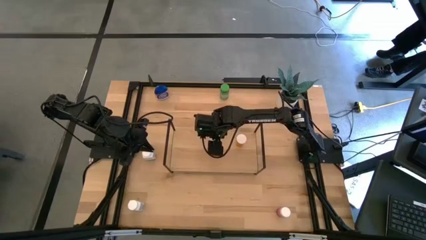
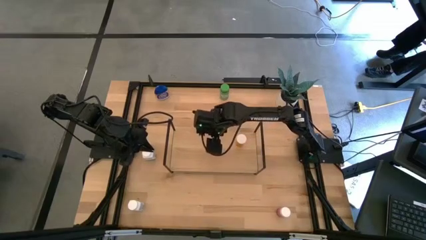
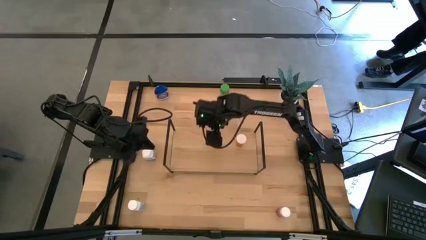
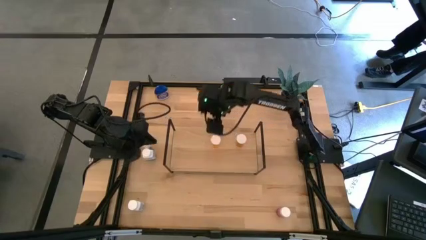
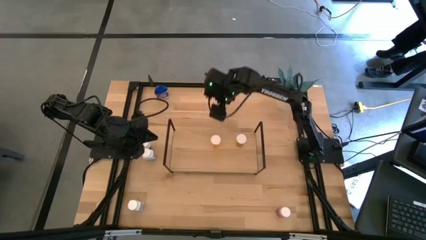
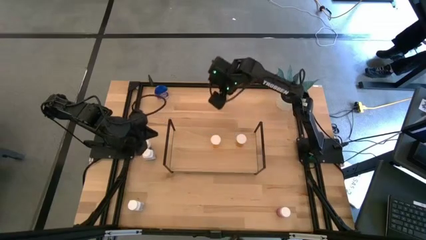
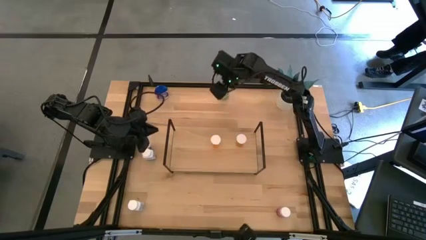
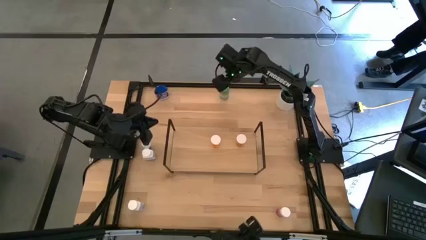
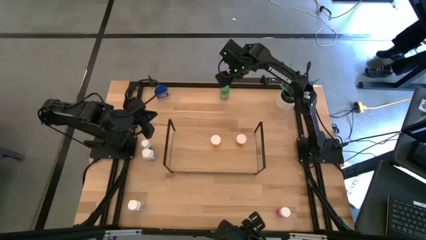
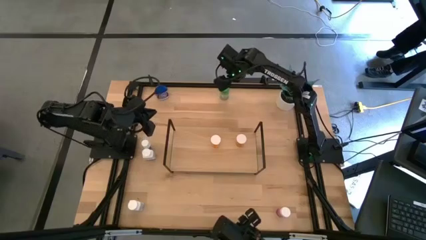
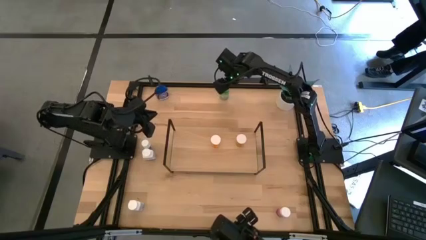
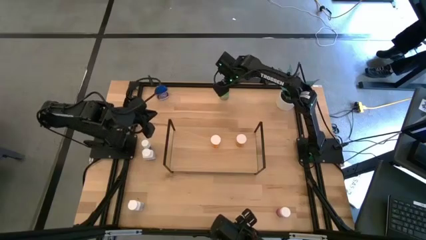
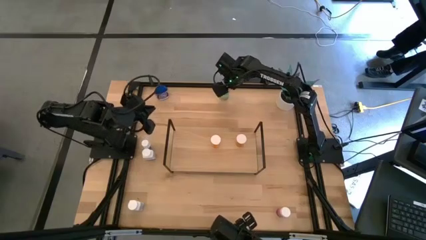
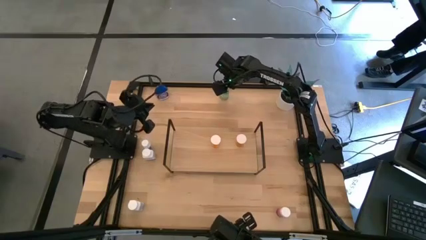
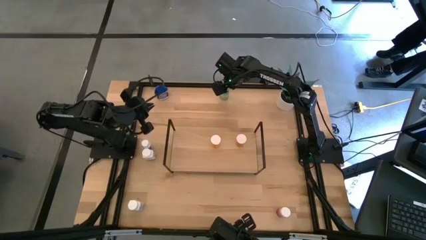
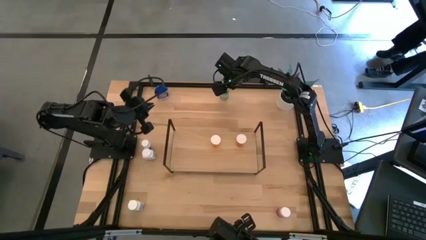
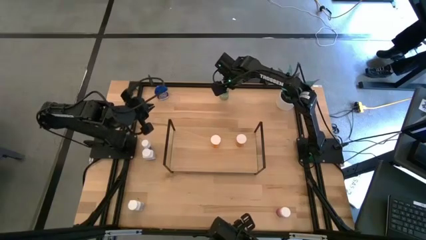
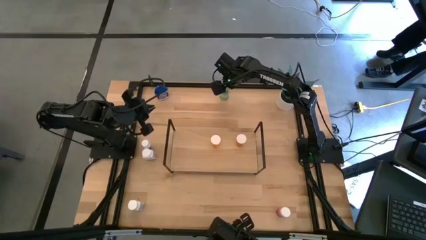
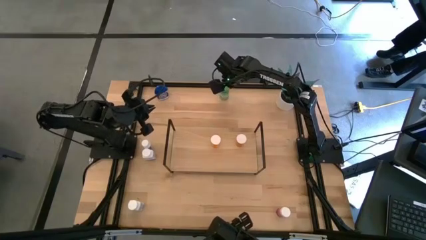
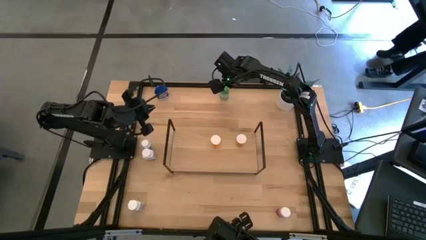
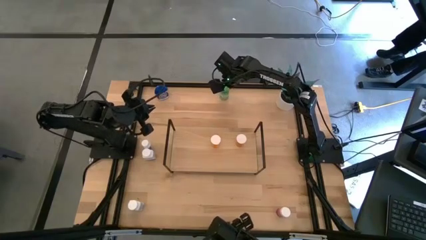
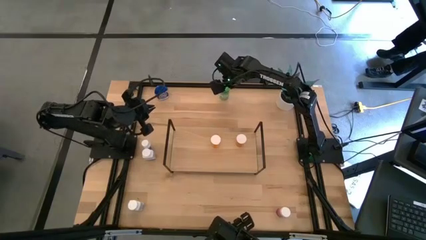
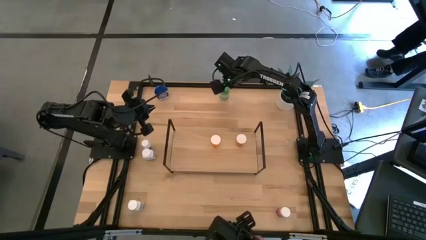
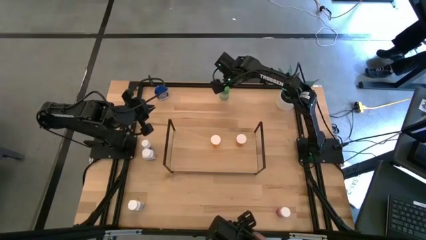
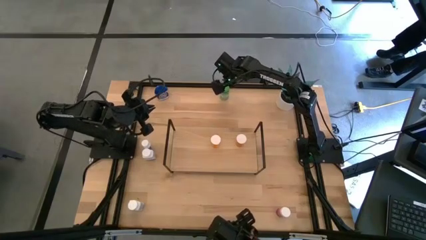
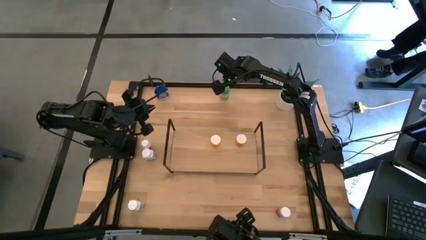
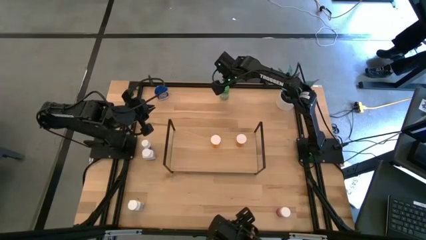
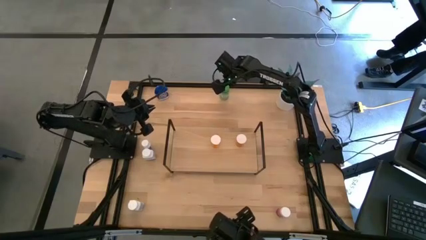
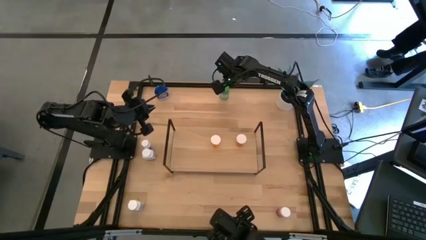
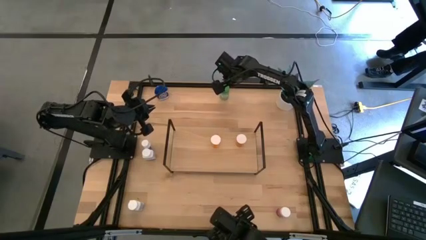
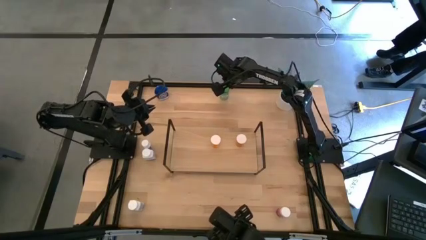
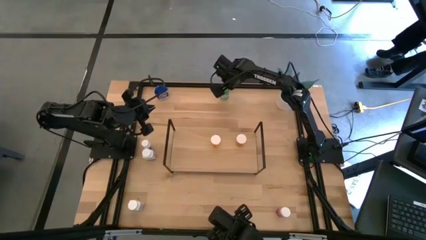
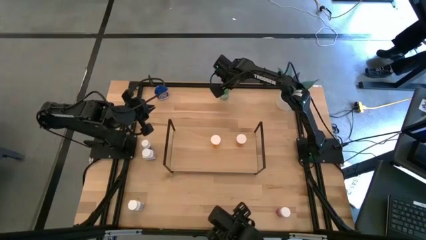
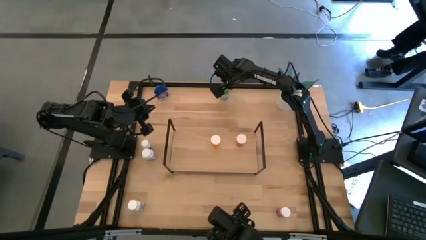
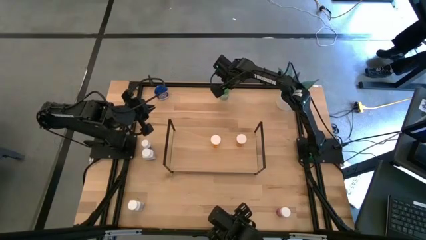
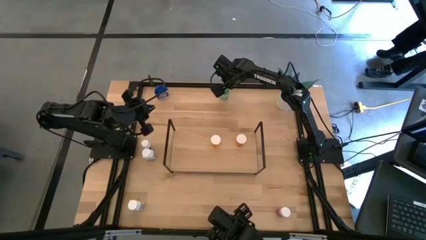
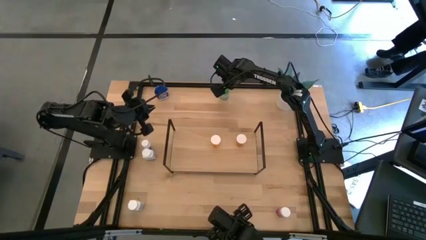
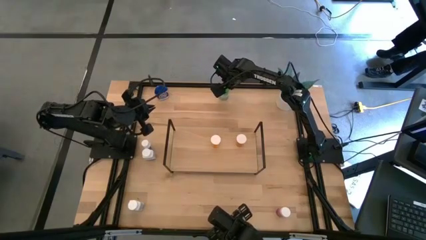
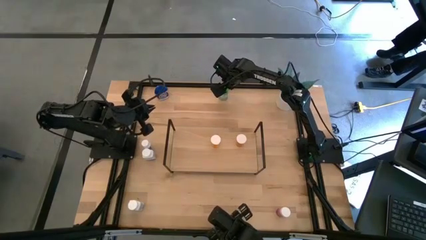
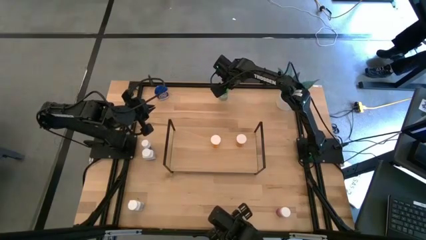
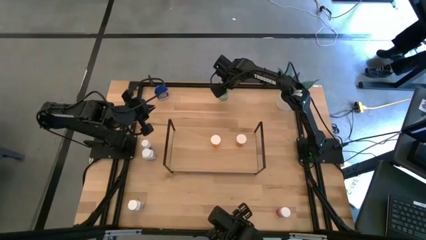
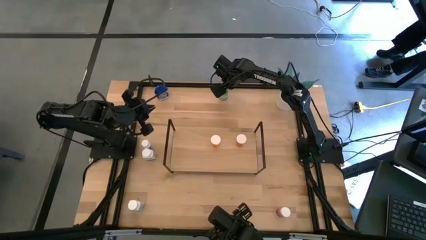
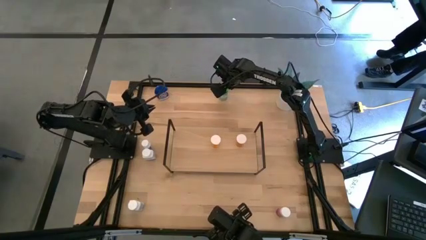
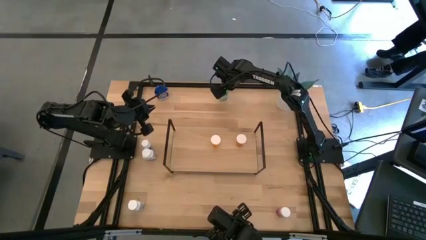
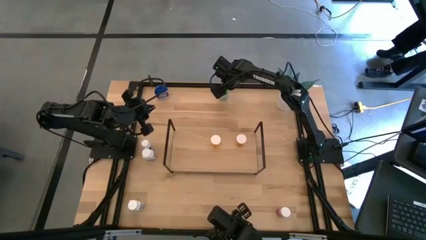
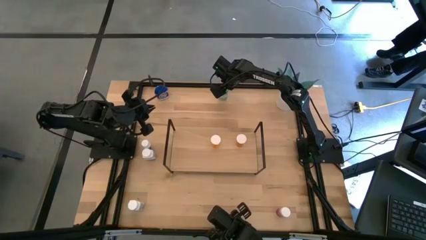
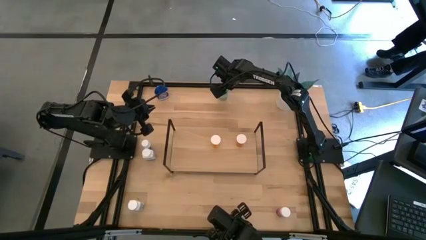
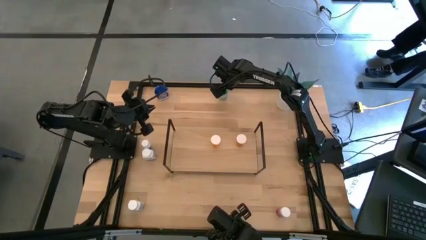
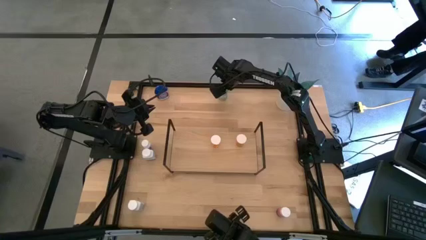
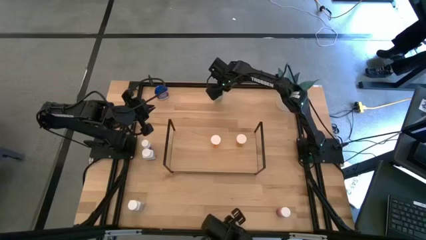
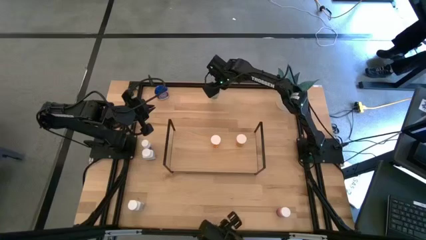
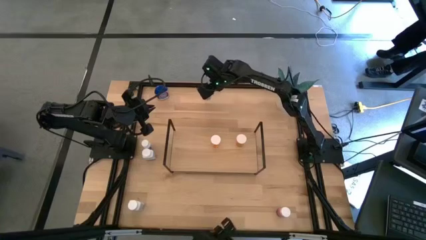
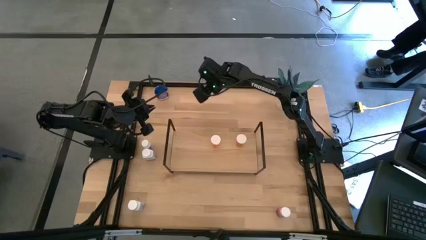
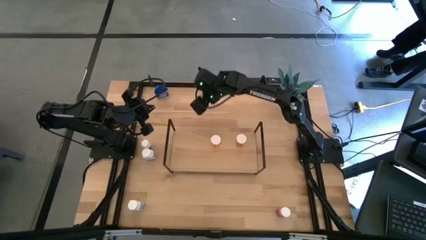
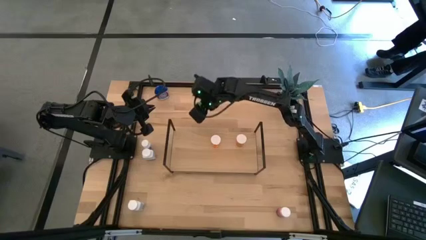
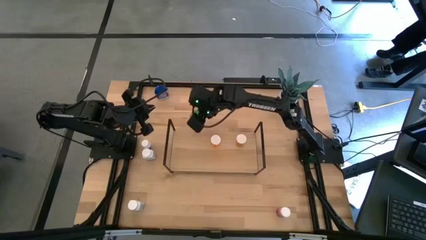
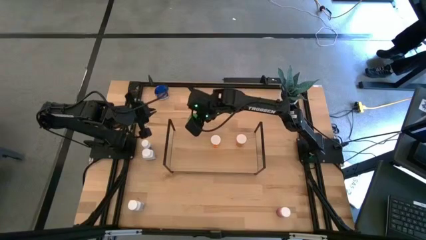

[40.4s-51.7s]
Task: Pick and place medicine bottles onto shelf by color
Put the green pill bottle on the shelf
